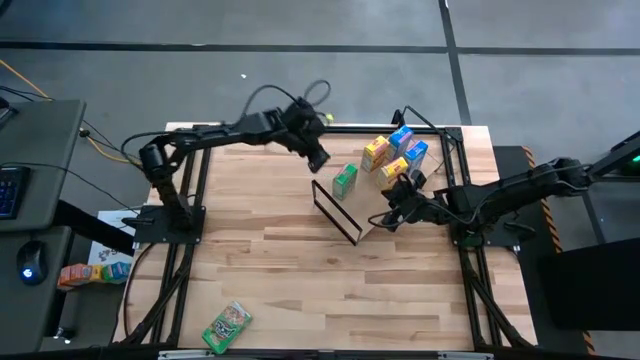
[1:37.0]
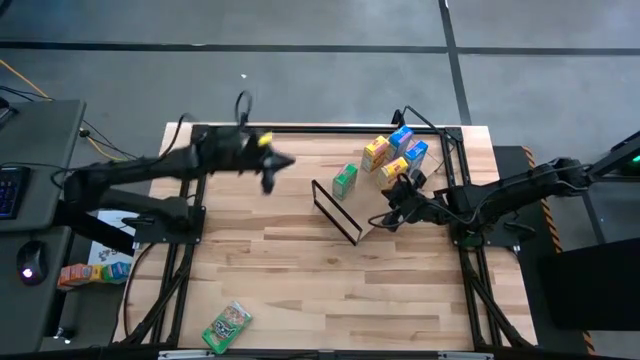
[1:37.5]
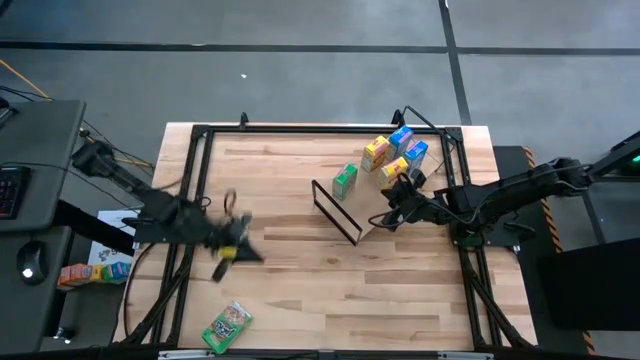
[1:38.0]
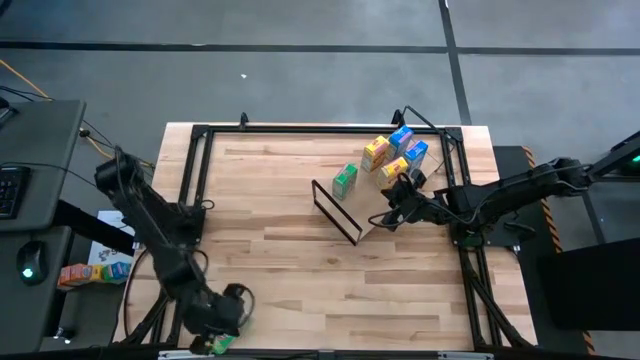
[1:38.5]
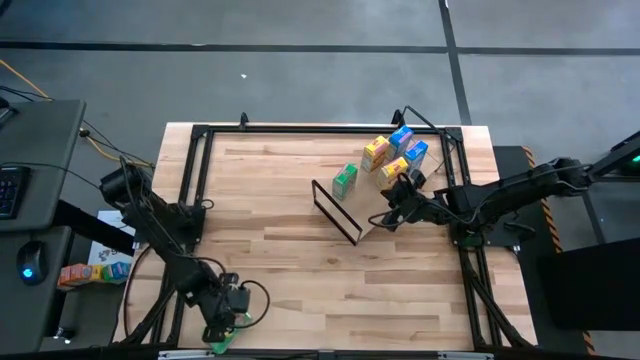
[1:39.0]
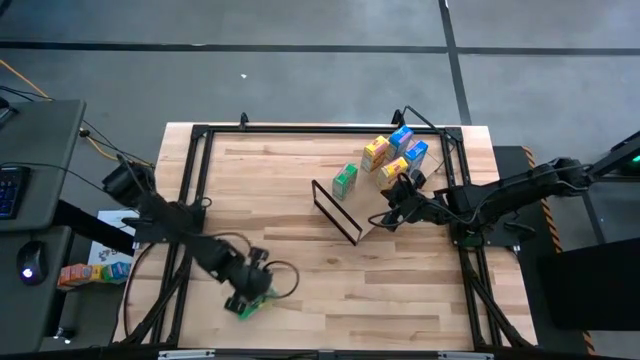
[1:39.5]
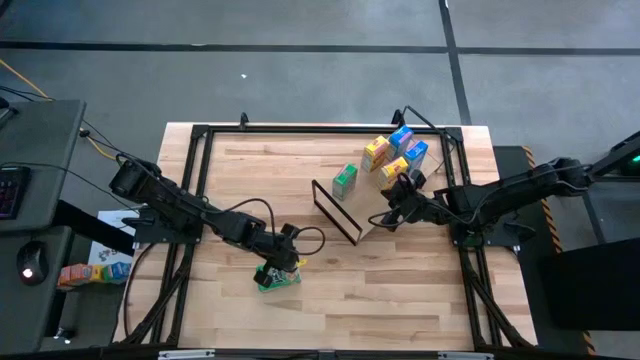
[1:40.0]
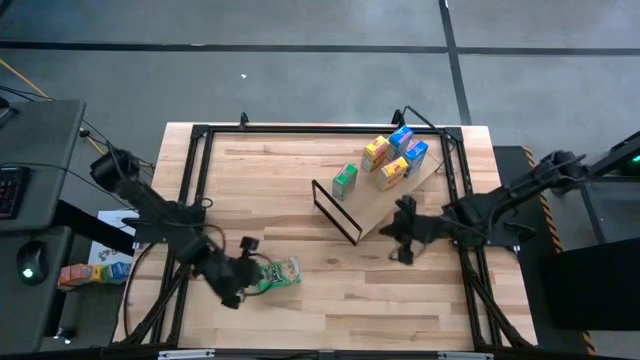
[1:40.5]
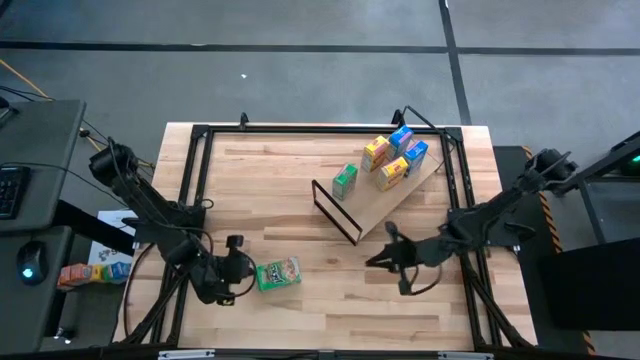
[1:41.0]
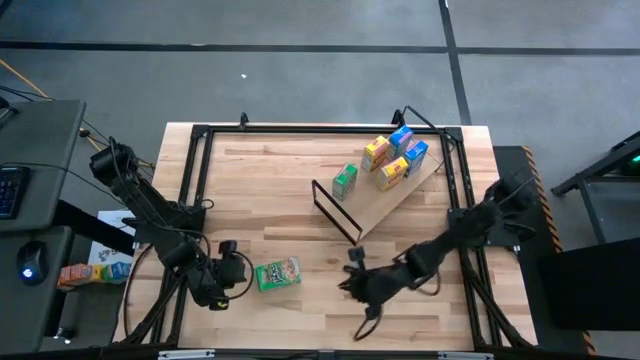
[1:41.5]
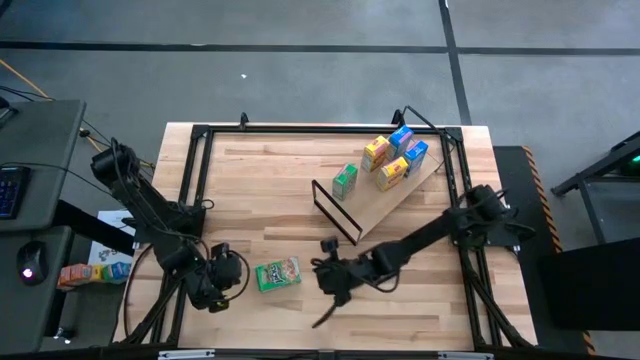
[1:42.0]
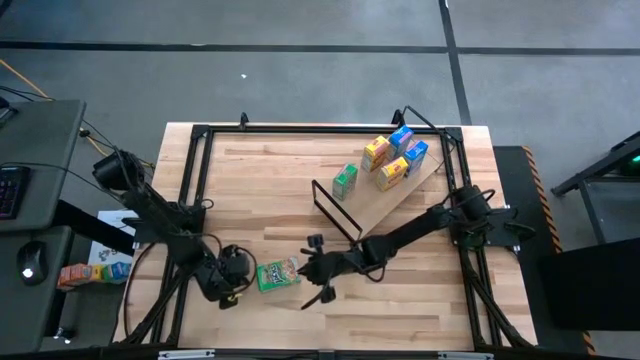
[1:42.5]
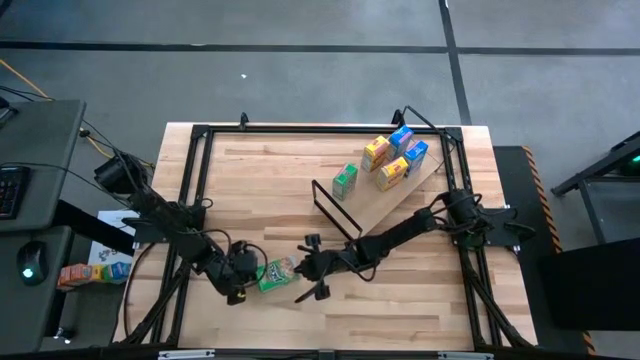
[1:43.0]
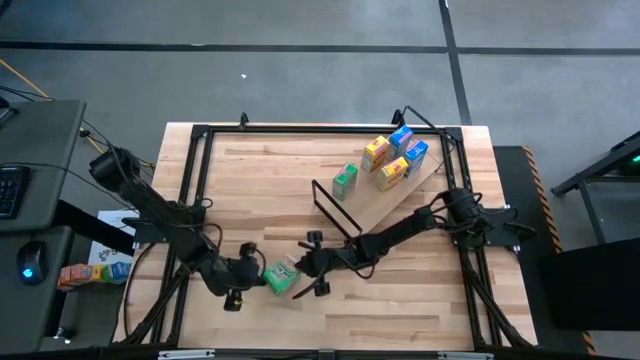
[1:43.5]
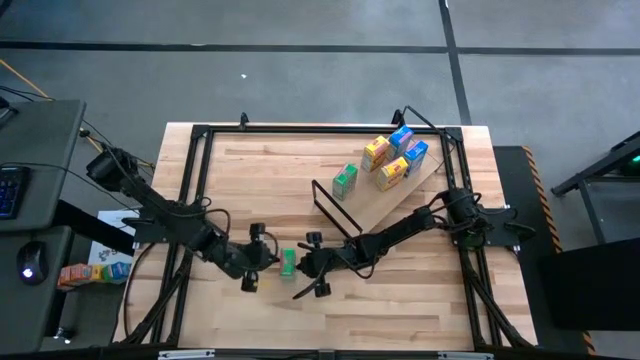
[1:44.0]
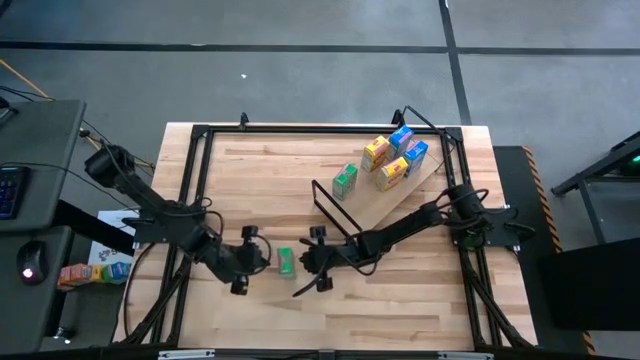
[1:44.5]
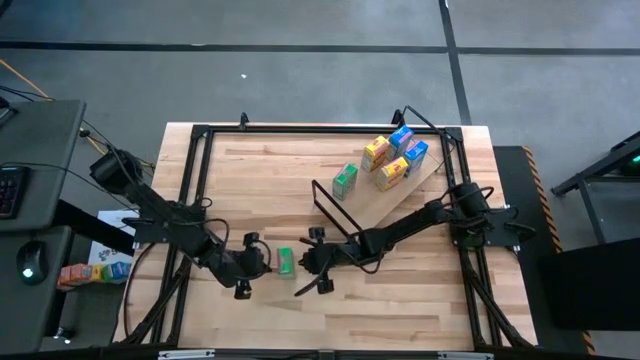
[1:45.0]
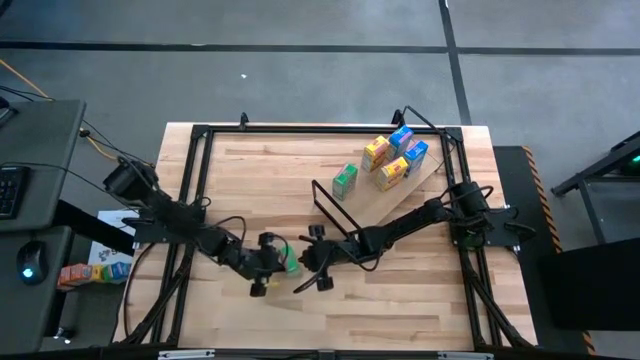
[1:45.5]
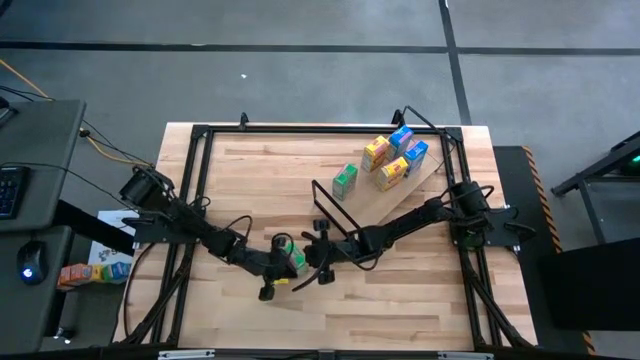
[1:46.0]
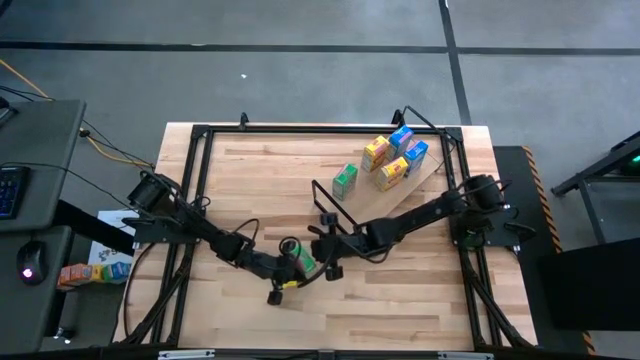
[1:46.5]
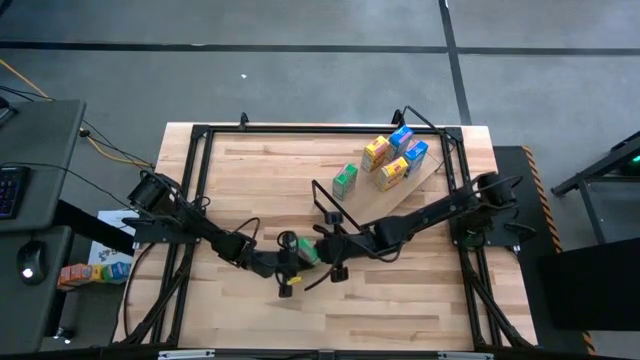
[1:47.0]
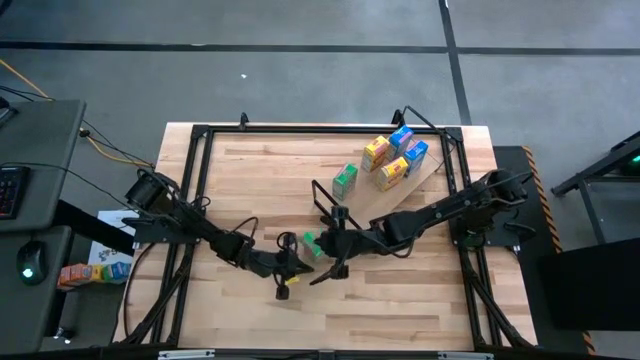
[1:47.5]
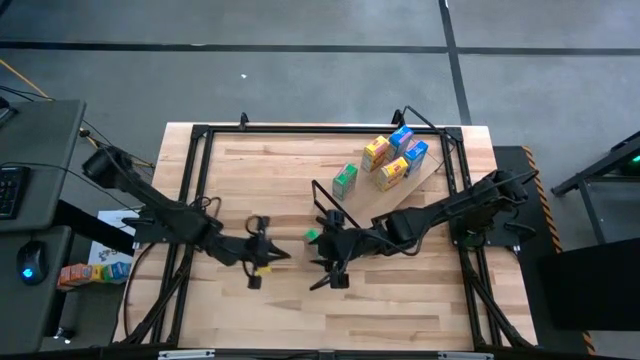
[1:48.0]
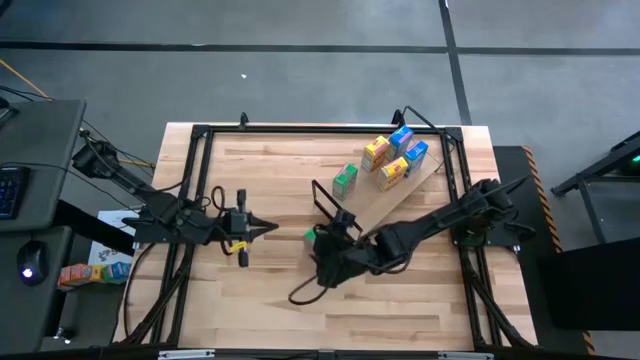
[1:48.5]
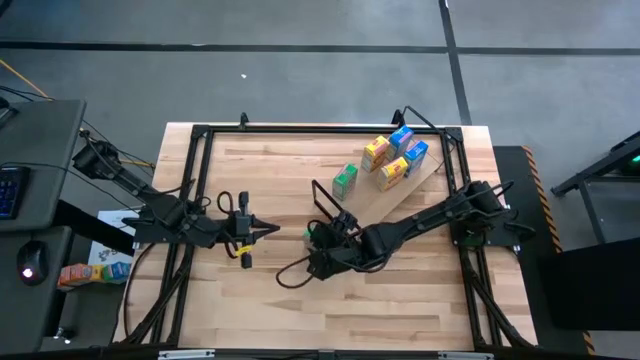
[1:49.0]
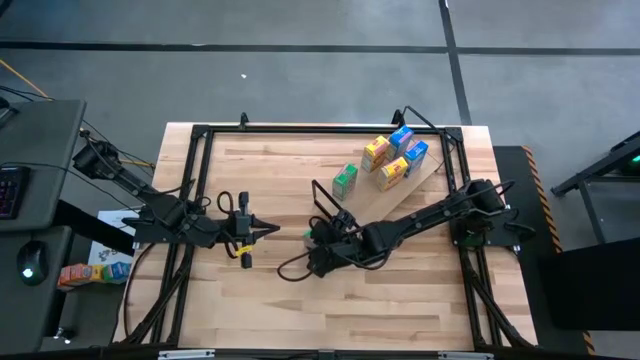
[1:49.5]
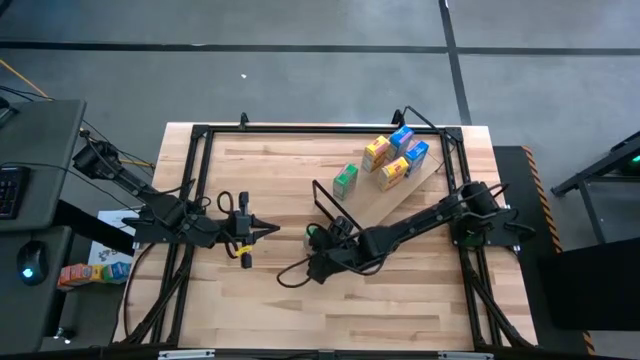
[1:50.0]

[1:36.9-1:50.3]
Task: Stack cereal on shelf
Put the green cereal box on the shelf aligned with the green cereal box

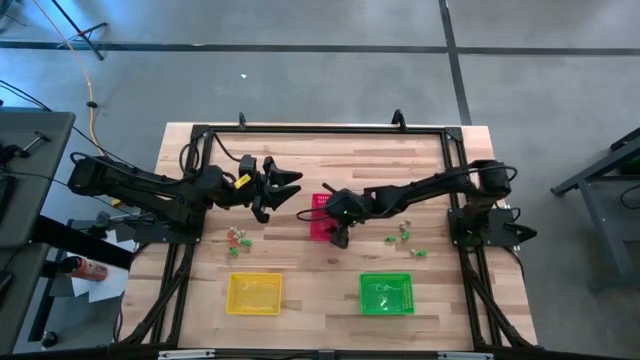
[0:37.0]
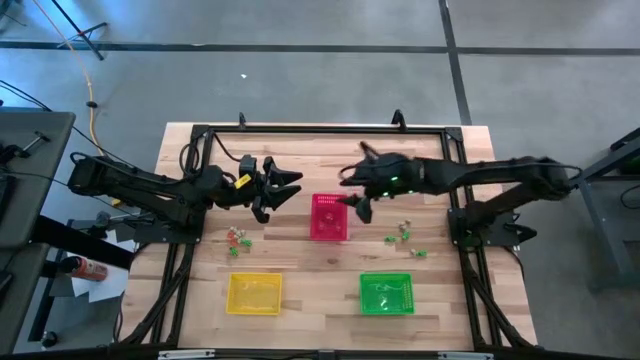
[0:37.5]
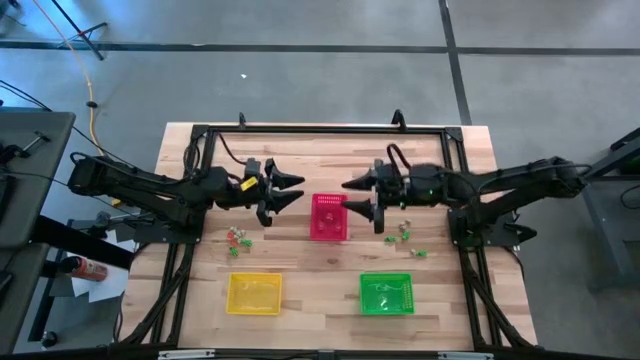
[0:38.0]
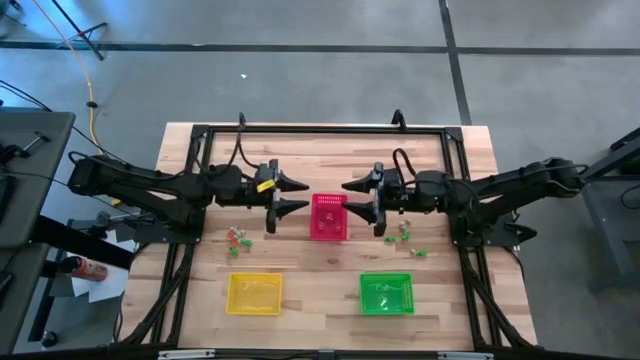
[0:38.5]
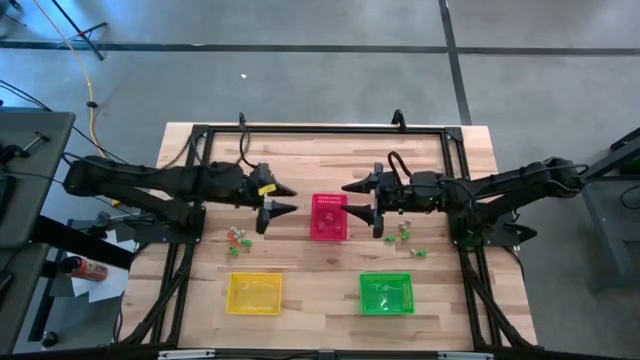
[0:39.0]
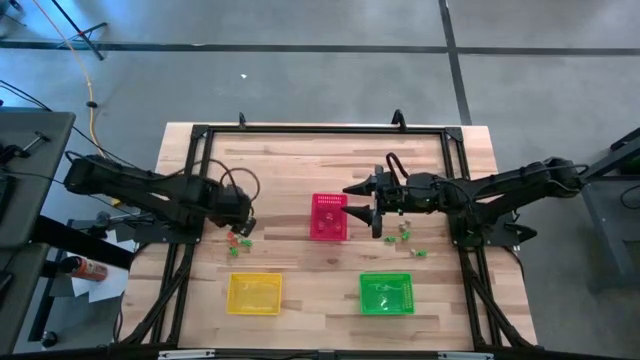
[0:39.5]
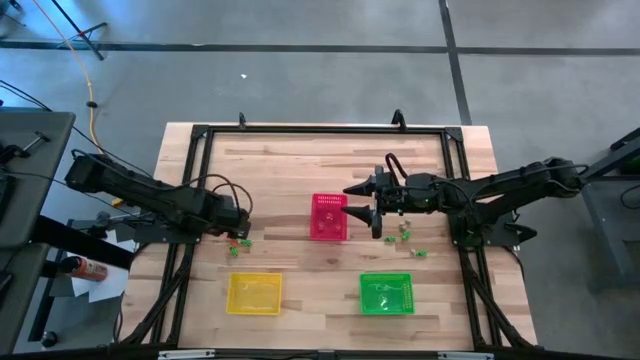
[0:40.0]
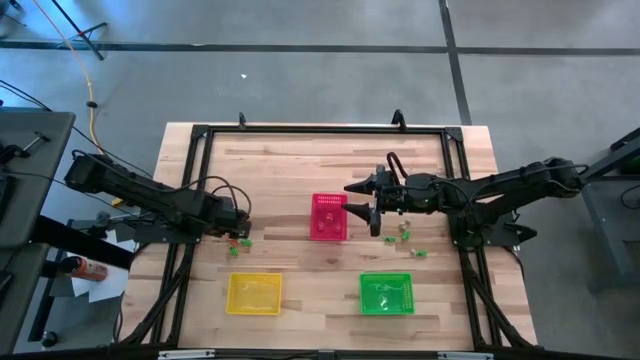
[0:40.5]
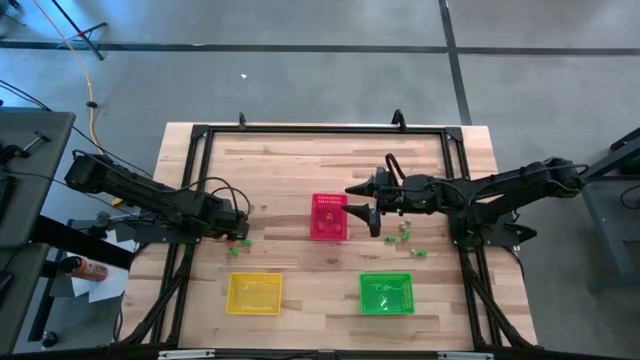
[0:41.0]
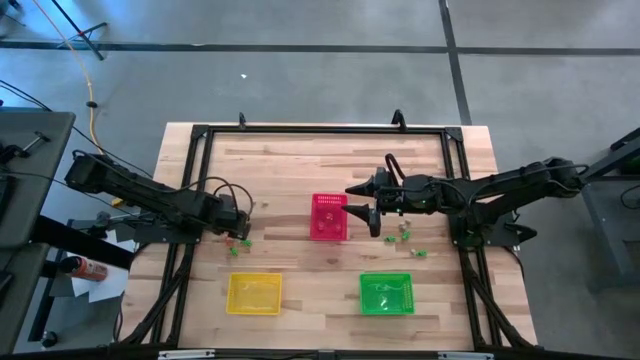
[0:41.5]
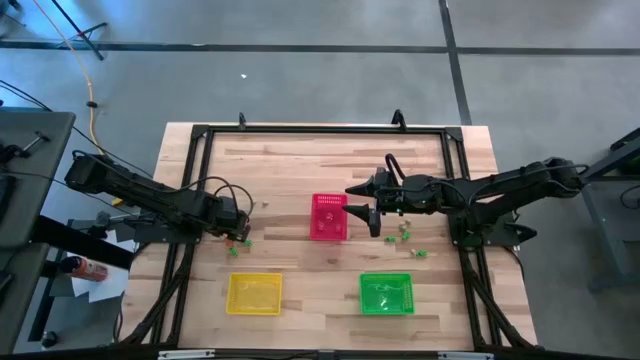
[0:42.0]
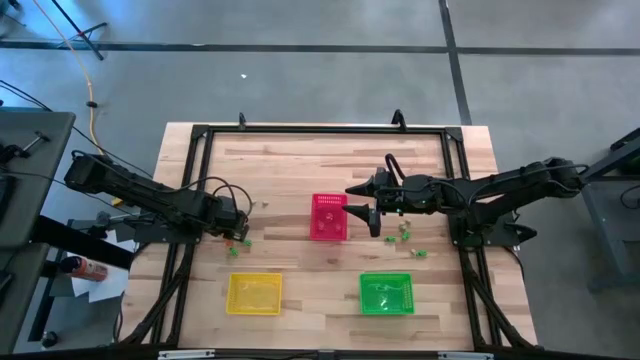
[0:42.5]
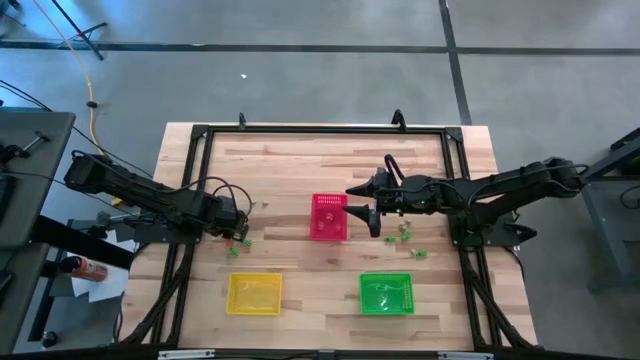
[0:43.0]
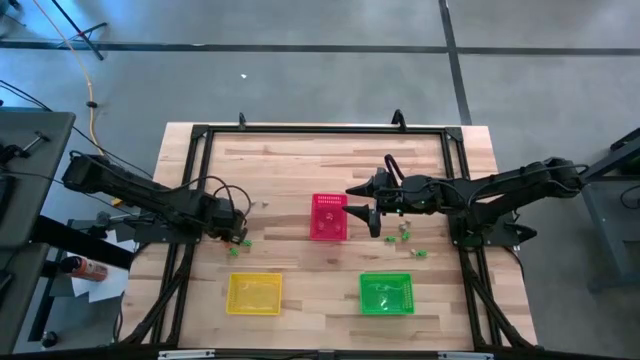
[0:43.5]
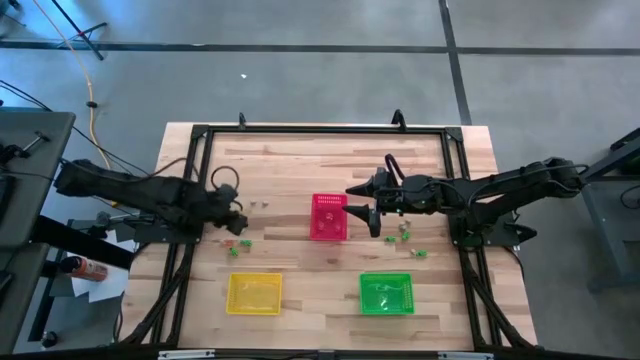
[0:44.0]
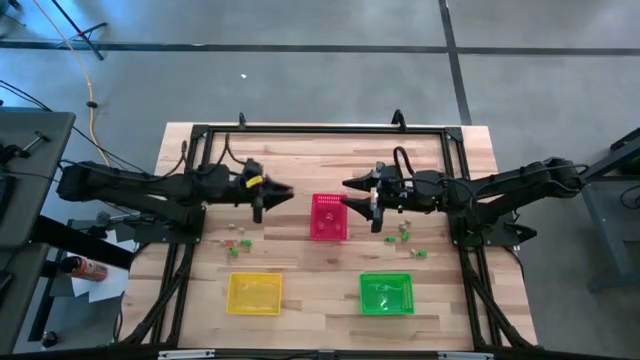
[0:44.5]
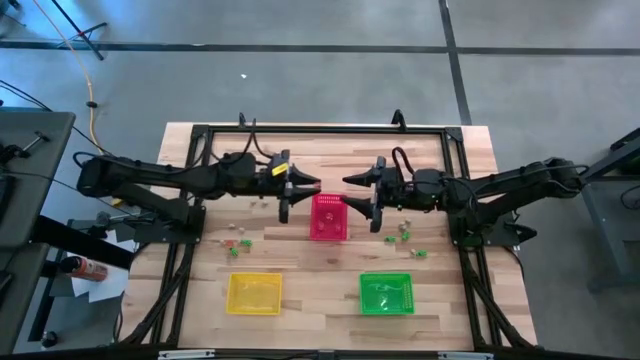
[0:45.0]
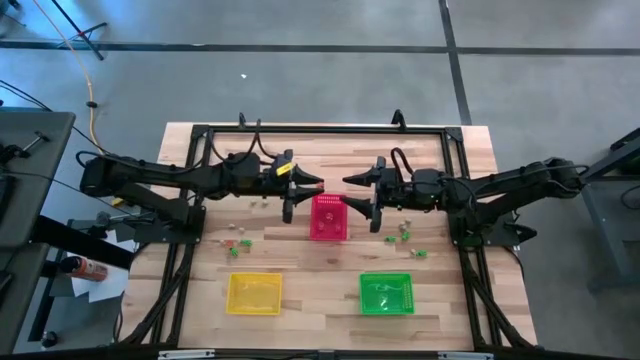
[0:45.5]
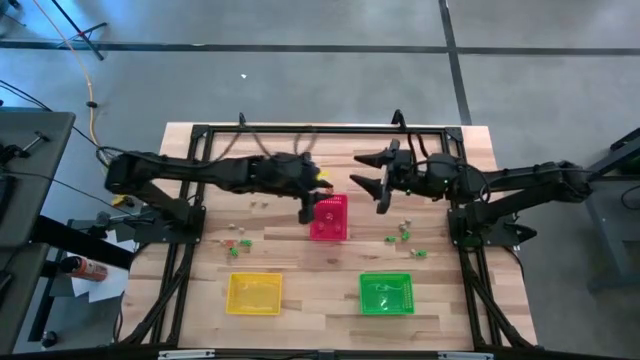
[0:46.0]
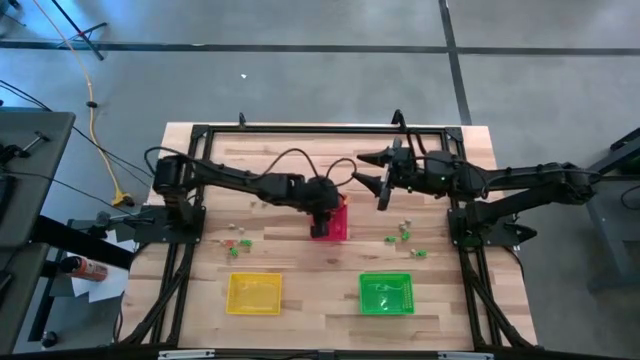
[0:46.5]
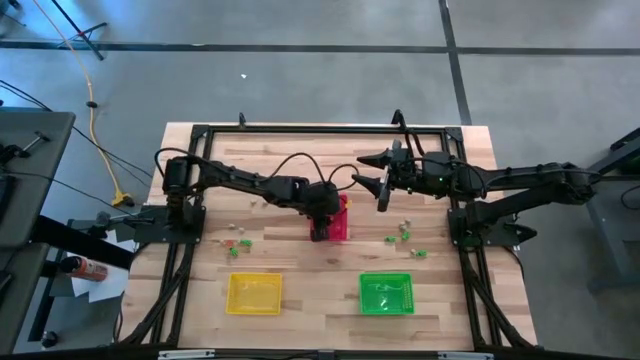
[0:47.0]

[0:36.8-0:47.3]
Task: Sort Halloween decoration
Put the top orange pumpkin toy into the red bin
